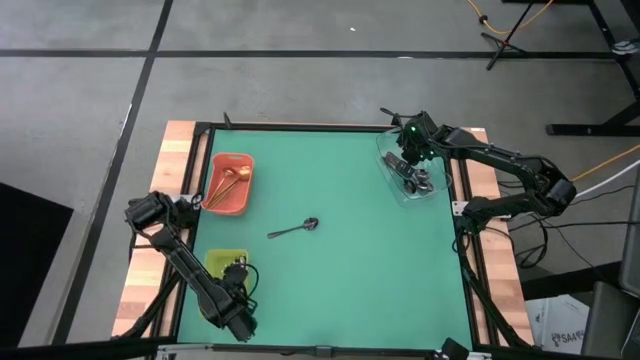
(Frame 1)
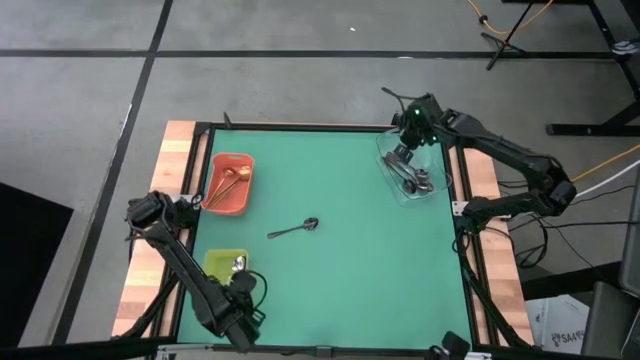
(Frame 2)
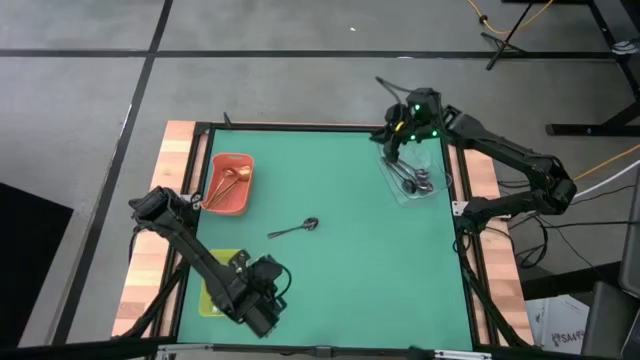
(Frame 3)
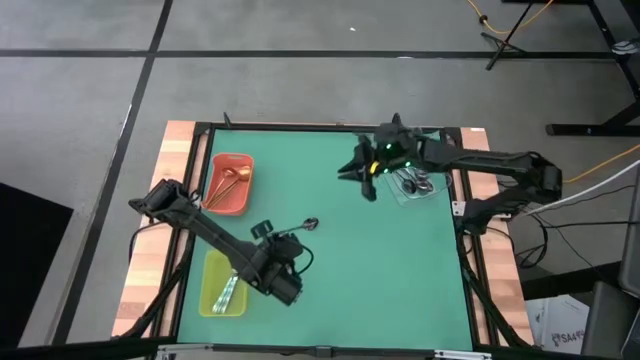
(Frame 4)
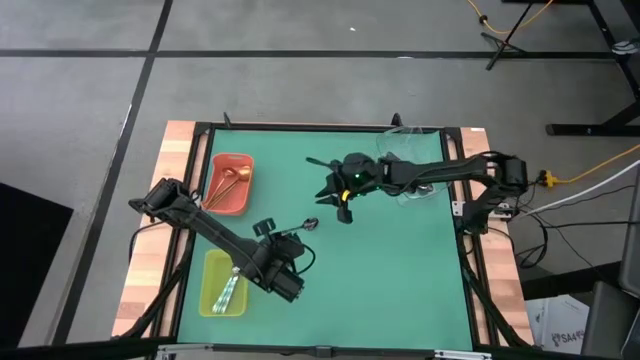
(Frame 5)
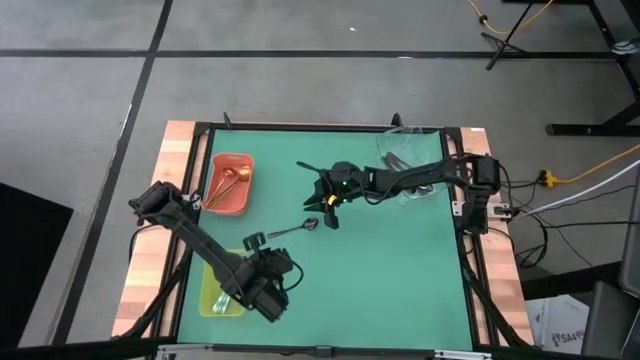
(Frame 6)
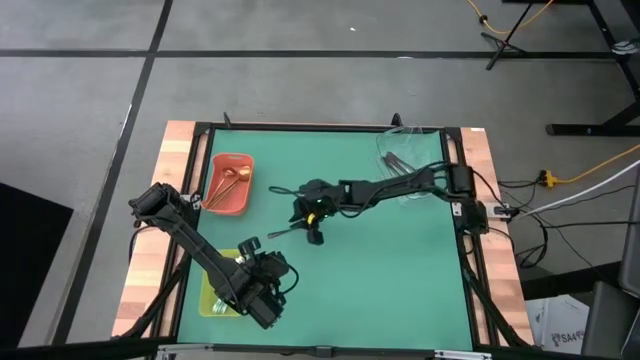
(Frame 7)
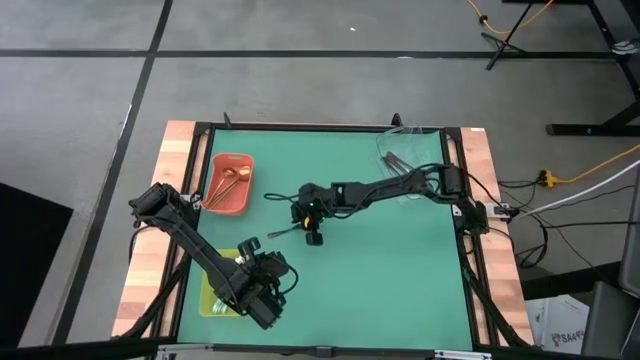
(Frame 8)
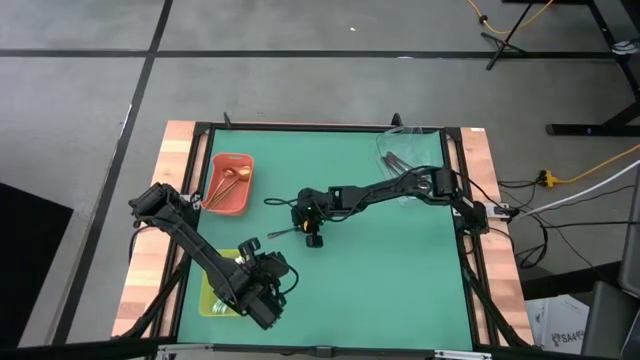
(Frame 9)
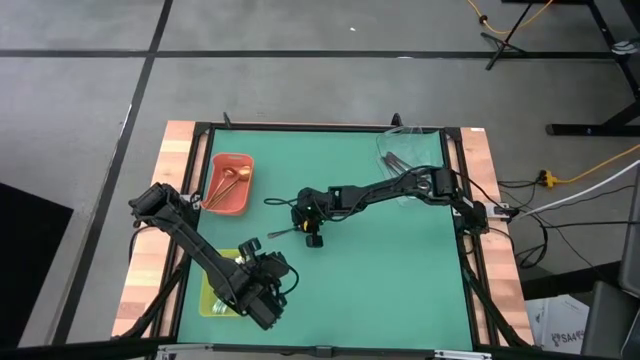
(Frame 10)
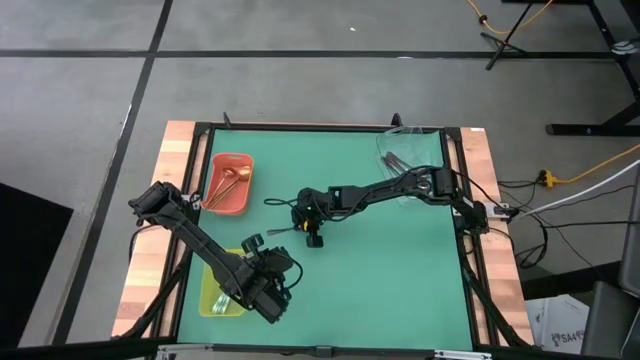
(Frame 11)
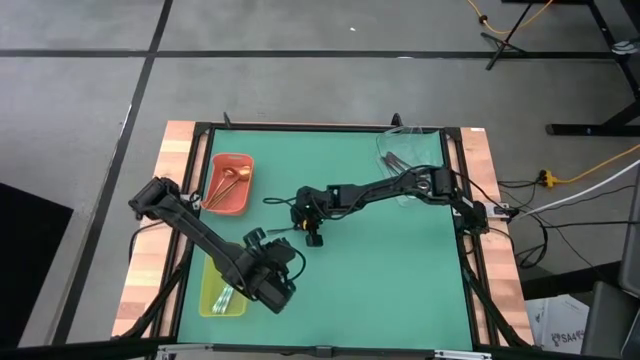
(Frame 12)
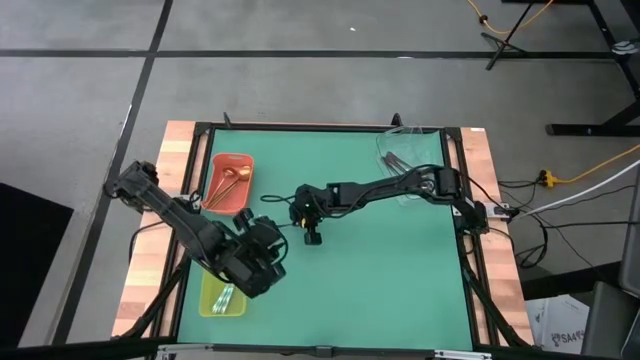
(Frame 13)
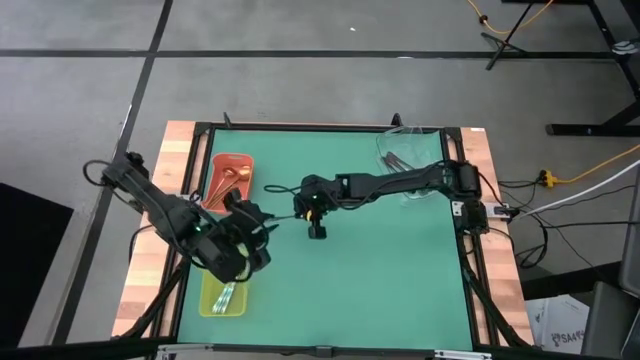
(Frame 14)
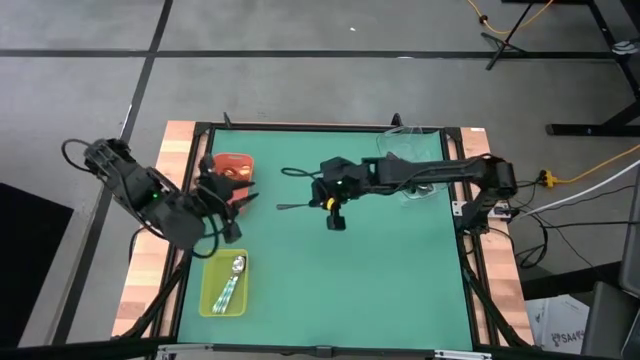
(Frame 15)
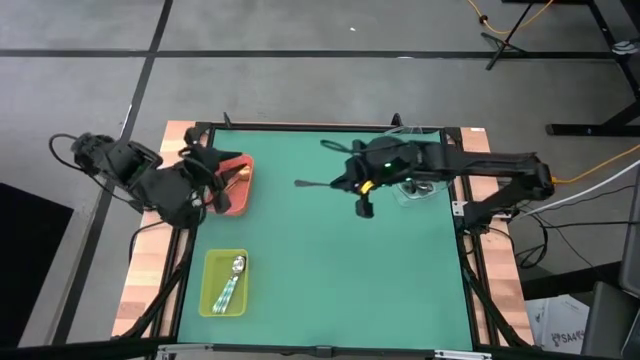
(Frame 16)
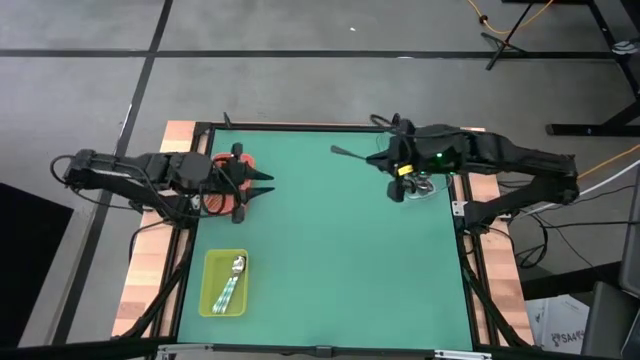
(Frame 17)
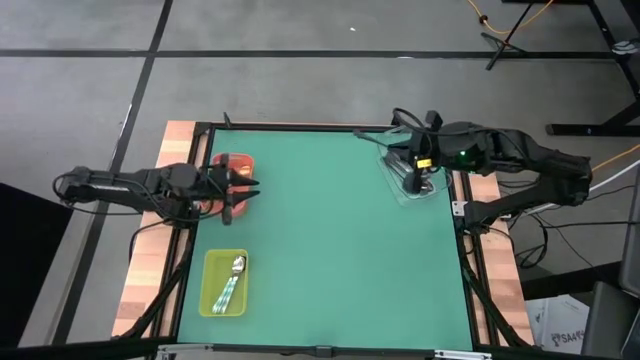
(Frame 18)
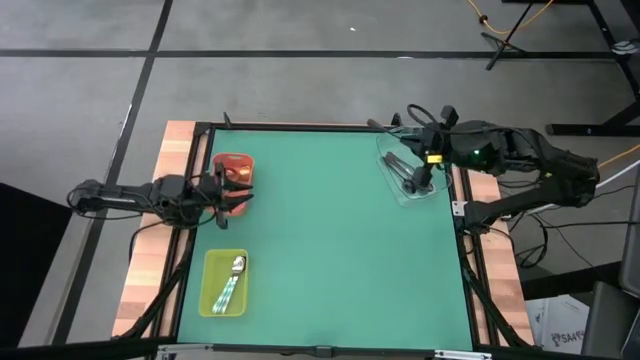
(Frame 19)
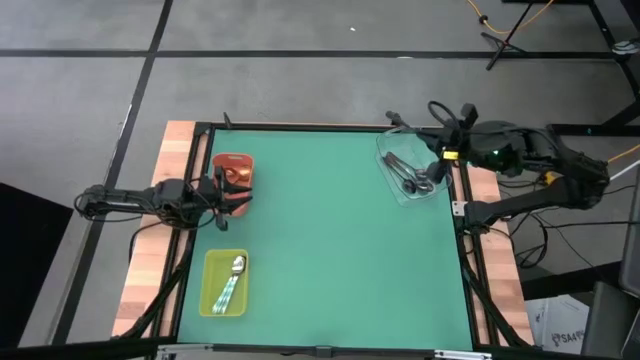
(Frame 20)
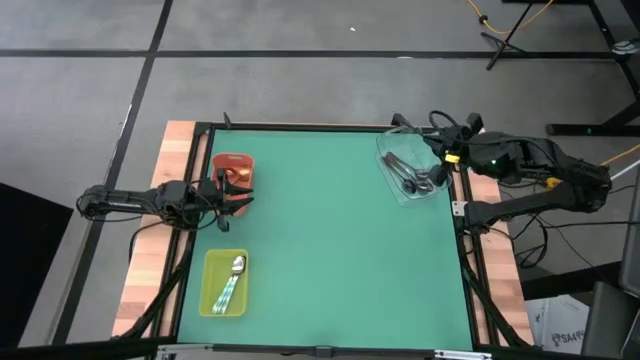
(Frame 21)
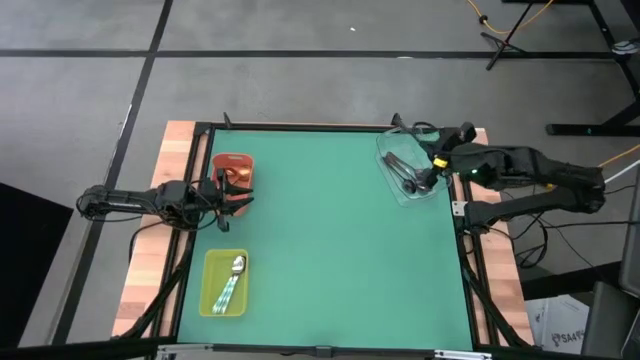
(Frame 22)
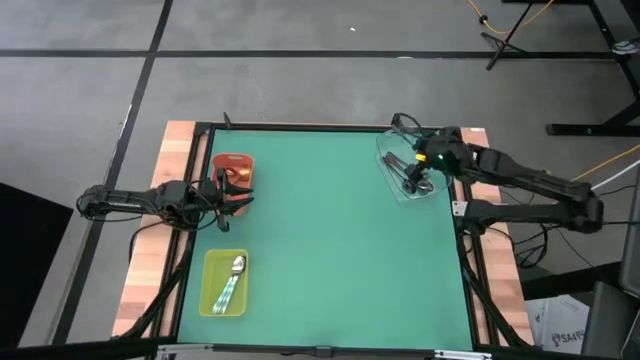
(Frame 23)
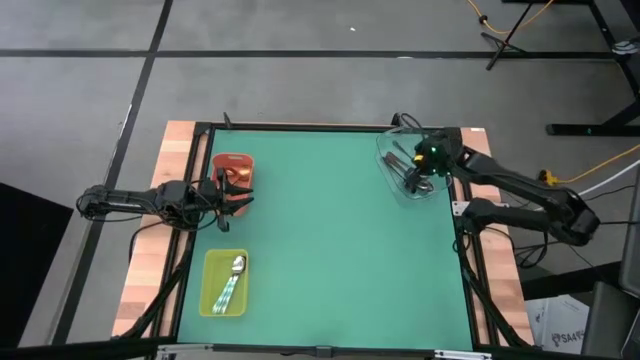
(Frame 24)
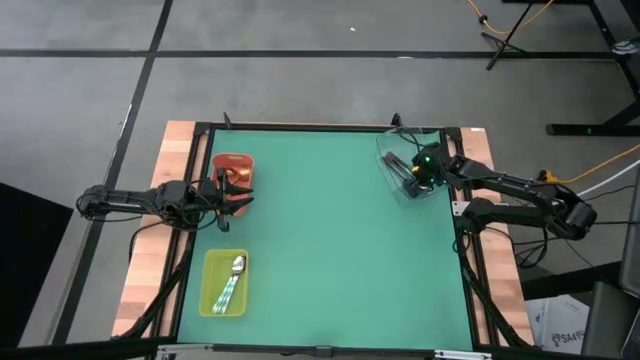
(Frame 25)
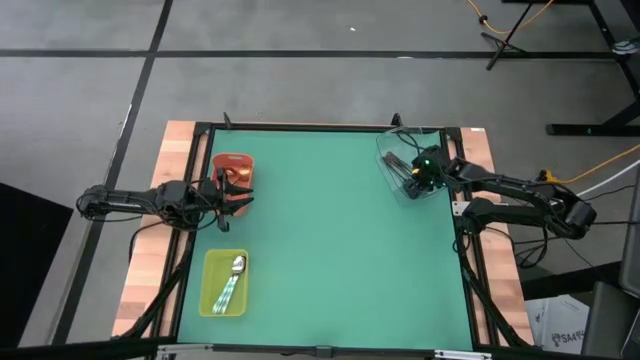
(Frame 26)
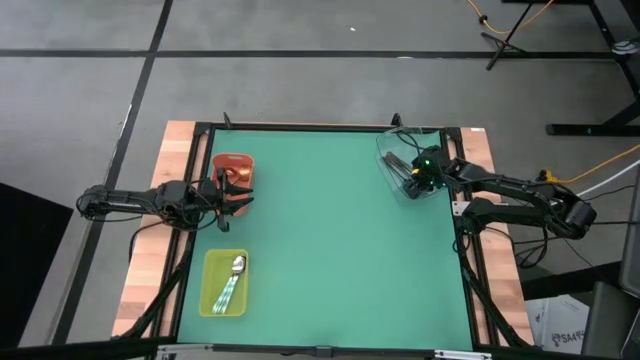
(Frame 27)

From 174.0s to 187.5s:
Task: Sort silverware by color (type)
Put the black spoon into the transparent bin

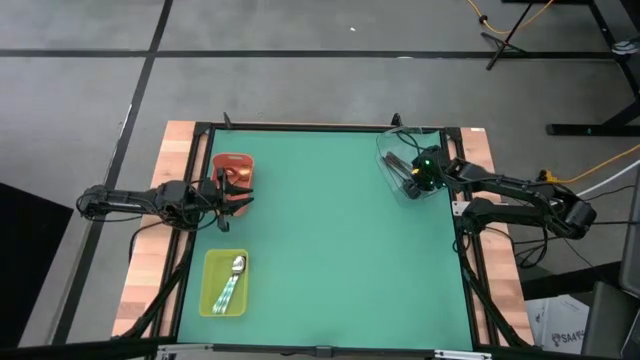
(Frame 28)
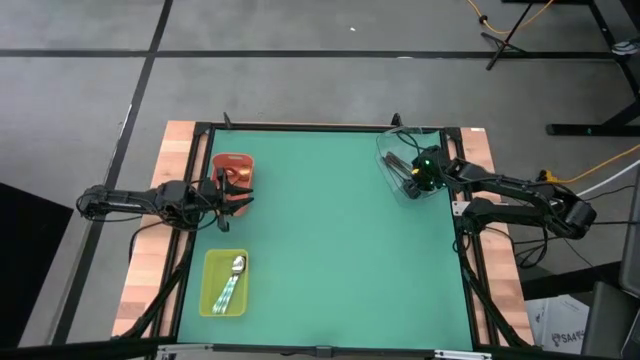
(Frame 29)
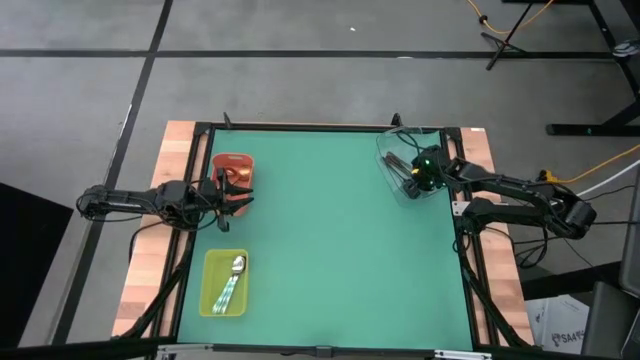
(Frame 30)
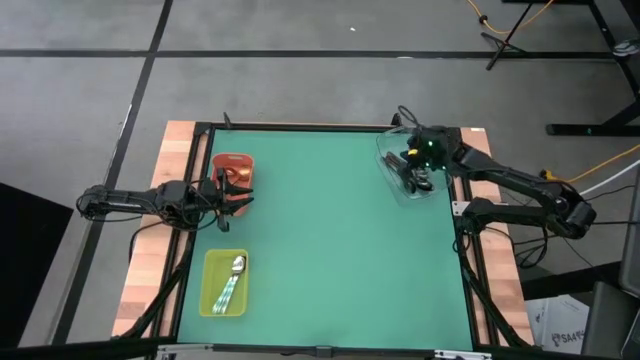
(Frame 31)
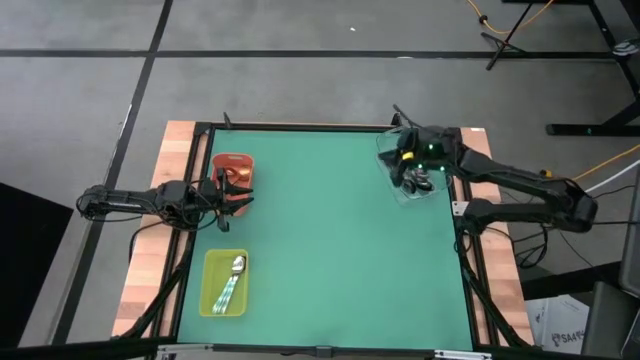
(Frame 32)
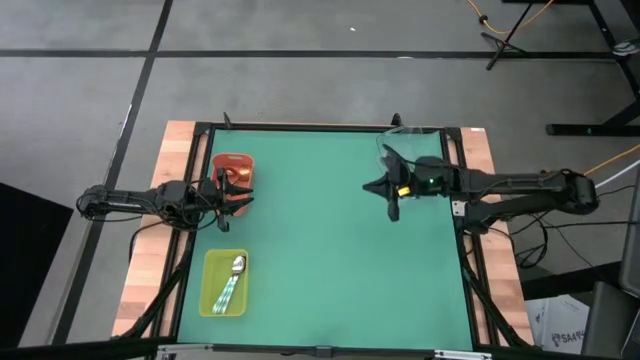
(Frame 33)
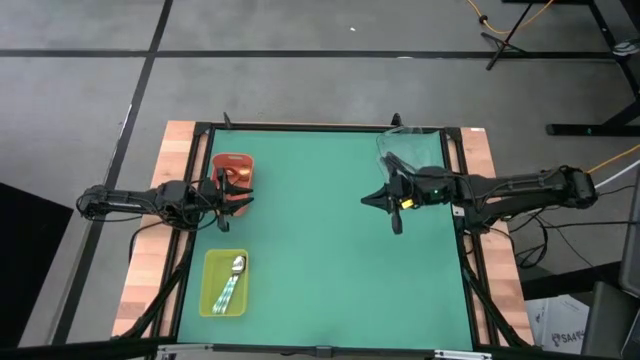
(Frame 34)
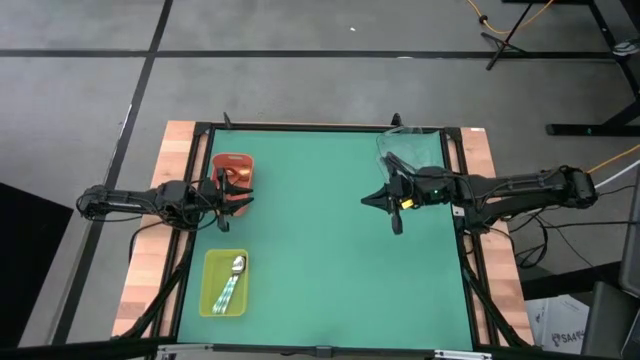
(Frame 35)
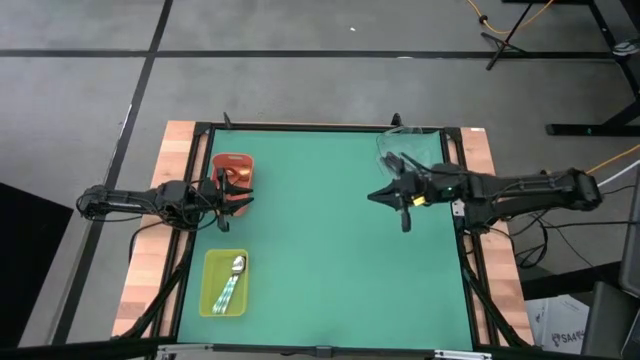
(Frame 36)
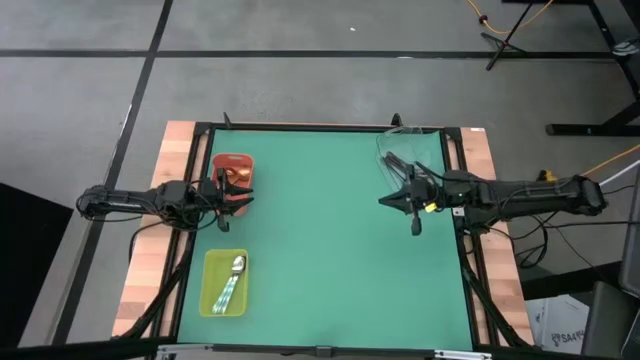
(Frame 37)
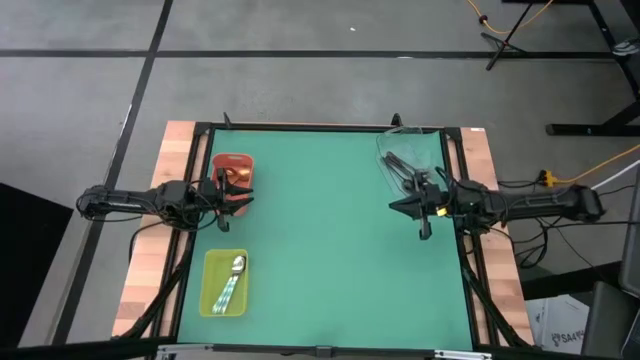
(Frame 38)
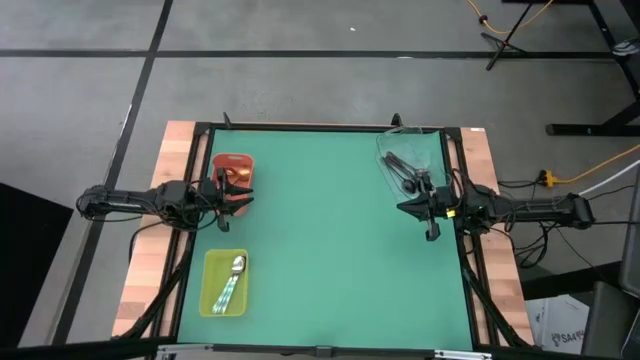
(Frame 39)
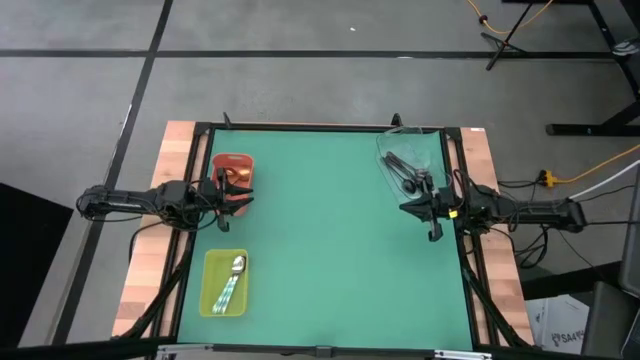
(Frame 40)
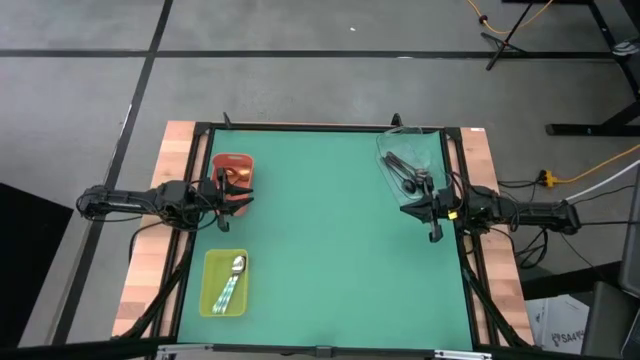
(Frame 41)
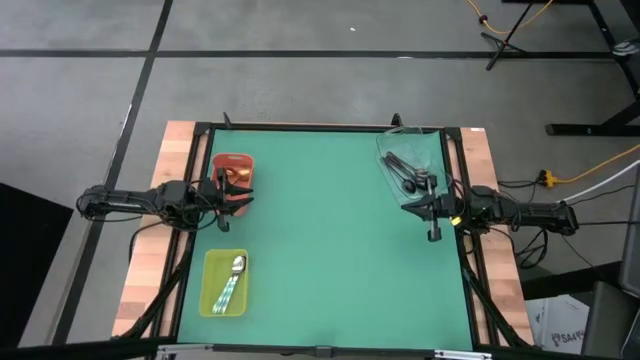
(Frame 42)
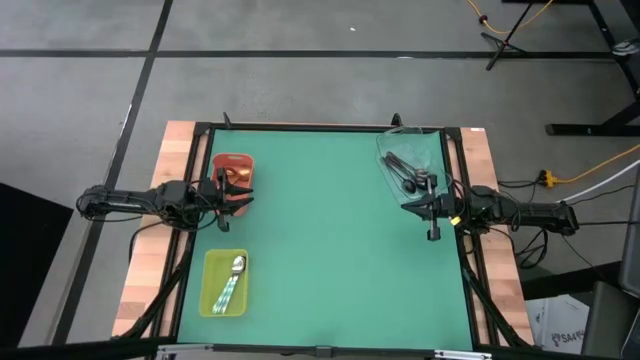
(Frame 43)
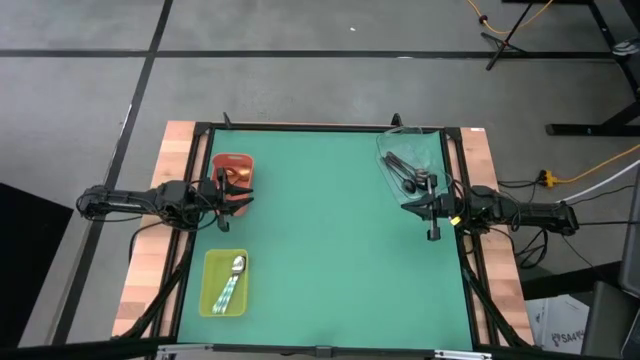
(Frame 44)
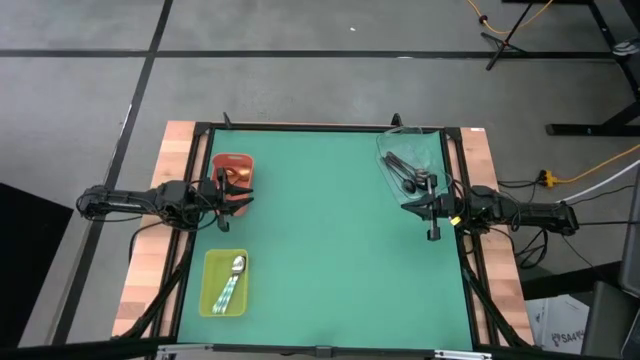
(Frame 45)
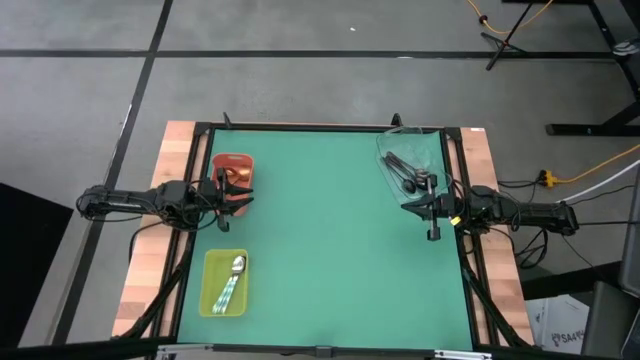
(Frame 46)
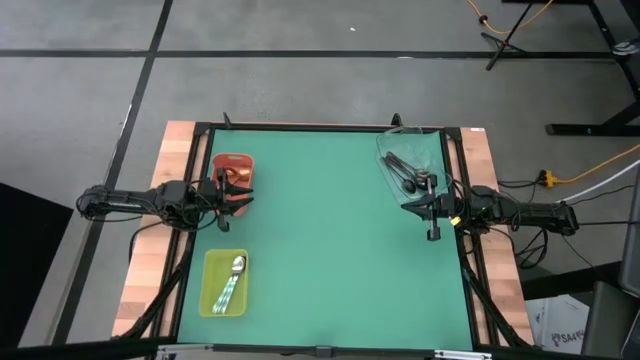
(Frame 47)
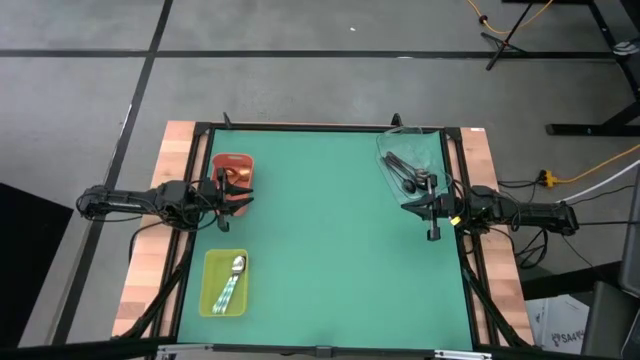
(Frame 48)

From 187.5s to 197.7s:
Return to Home Position
